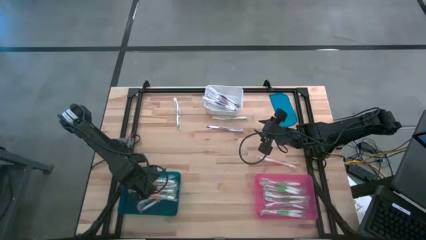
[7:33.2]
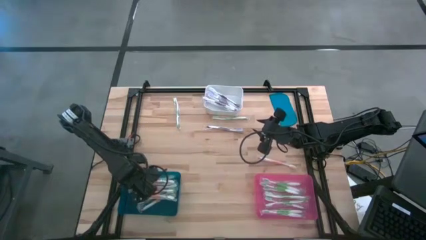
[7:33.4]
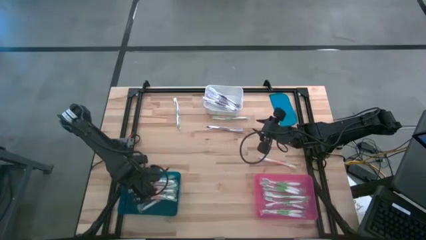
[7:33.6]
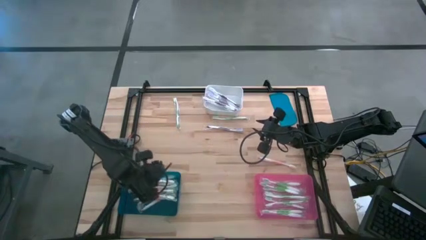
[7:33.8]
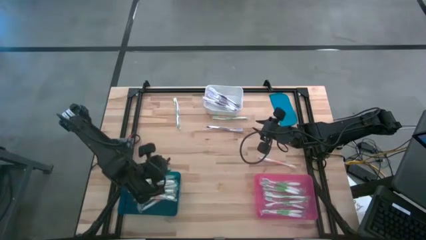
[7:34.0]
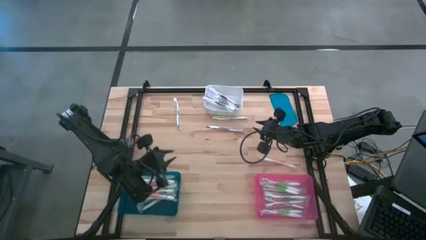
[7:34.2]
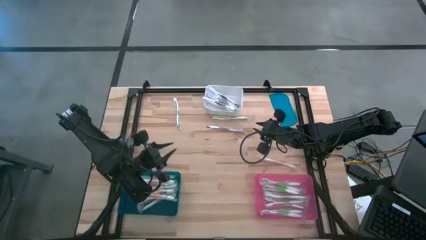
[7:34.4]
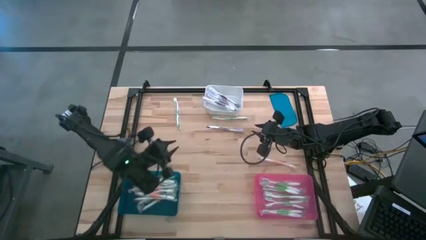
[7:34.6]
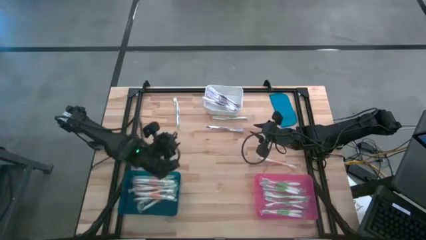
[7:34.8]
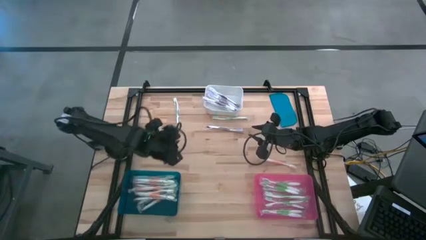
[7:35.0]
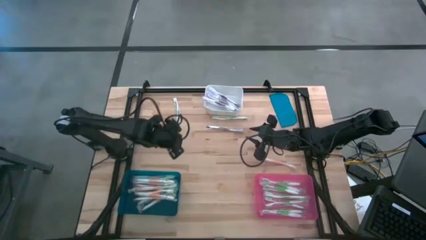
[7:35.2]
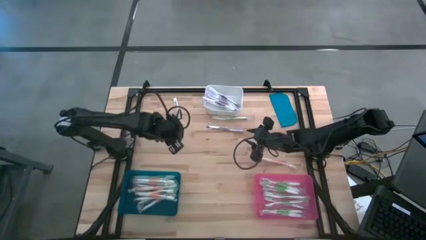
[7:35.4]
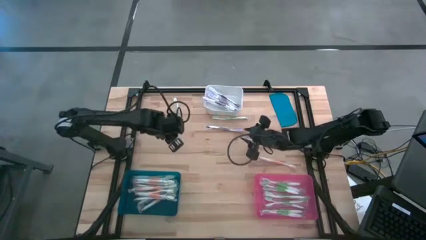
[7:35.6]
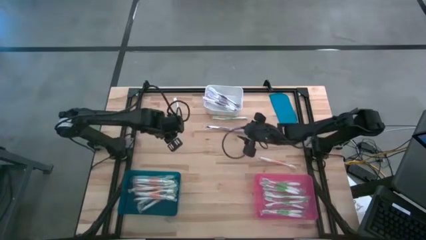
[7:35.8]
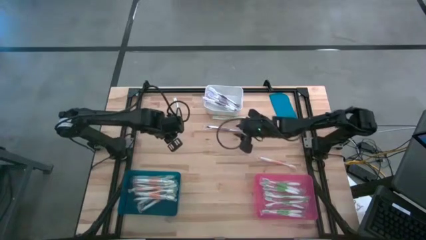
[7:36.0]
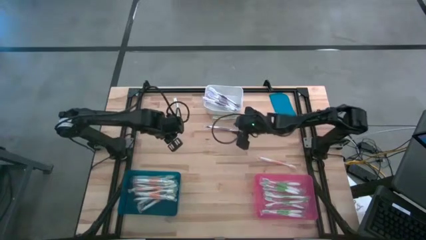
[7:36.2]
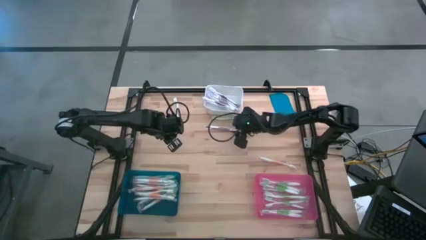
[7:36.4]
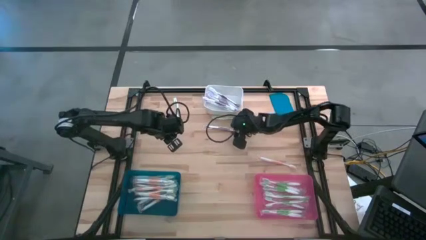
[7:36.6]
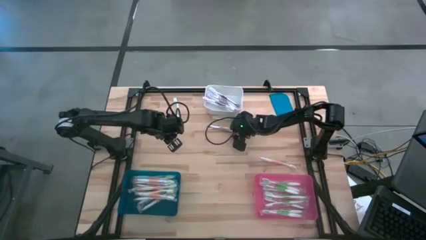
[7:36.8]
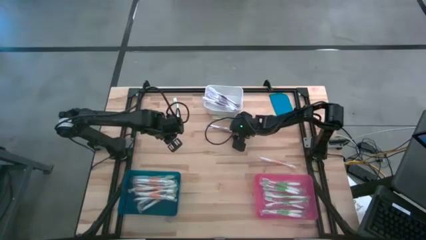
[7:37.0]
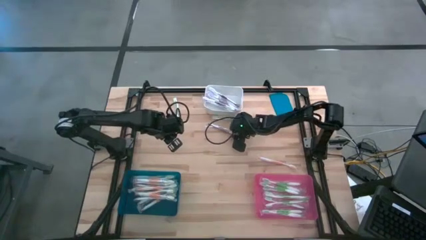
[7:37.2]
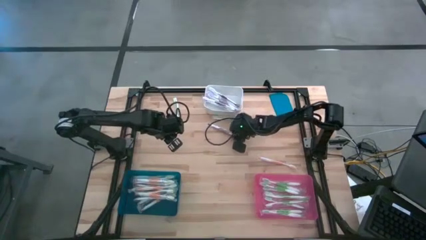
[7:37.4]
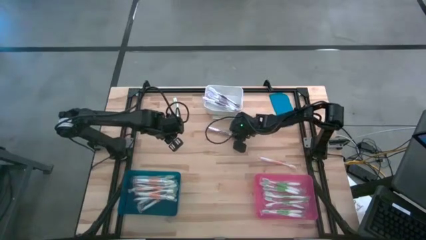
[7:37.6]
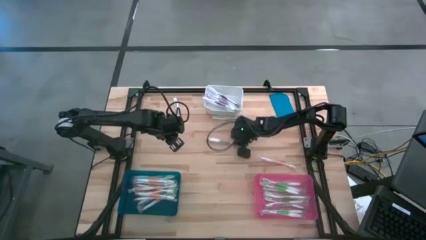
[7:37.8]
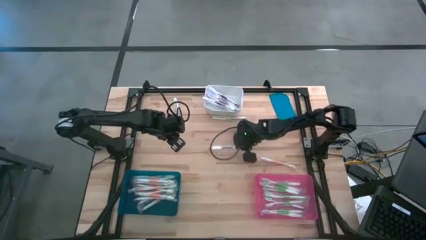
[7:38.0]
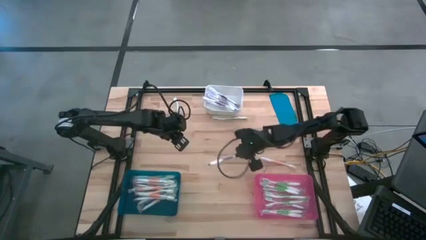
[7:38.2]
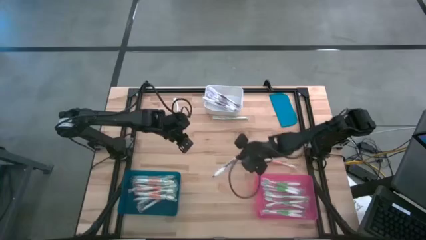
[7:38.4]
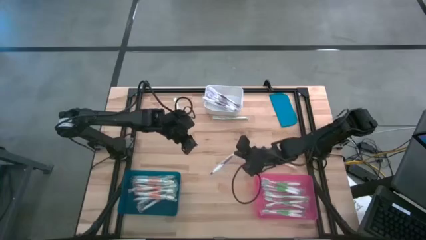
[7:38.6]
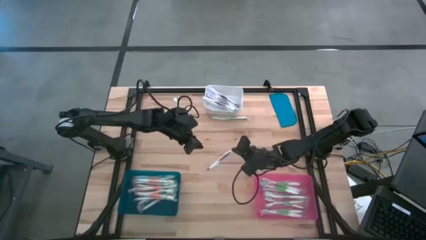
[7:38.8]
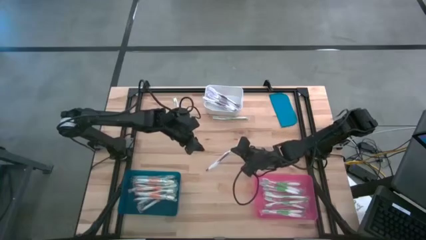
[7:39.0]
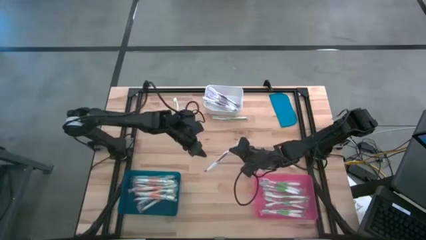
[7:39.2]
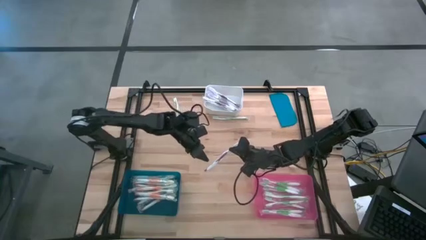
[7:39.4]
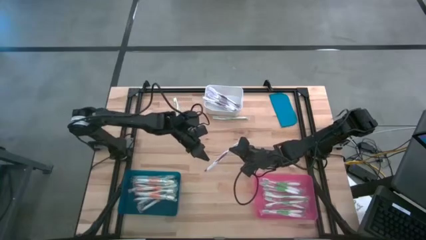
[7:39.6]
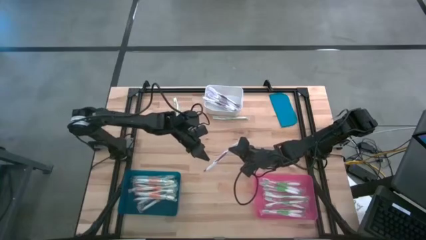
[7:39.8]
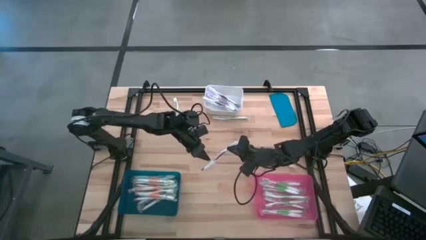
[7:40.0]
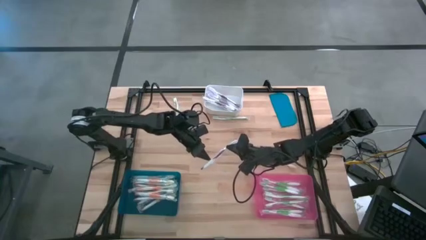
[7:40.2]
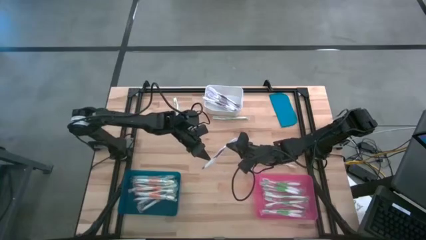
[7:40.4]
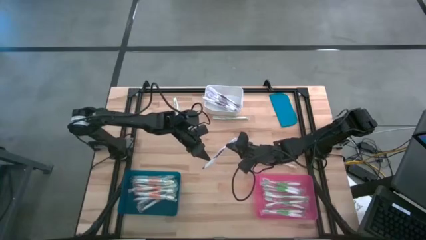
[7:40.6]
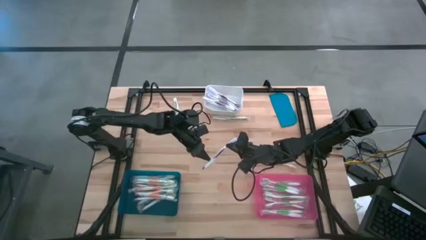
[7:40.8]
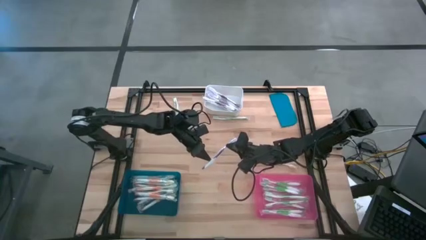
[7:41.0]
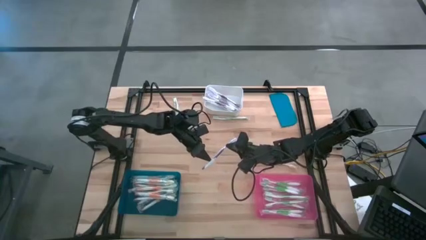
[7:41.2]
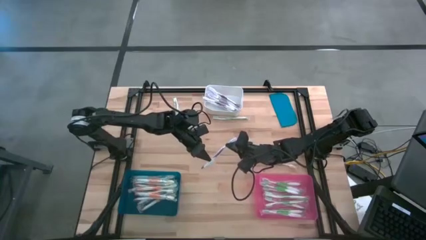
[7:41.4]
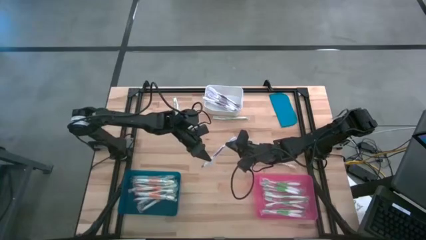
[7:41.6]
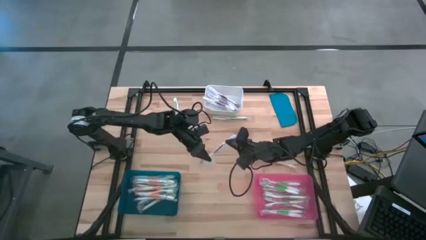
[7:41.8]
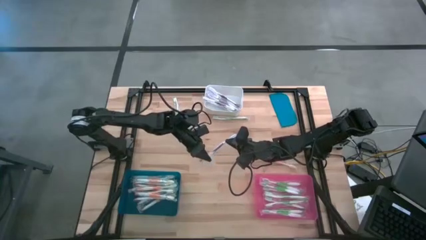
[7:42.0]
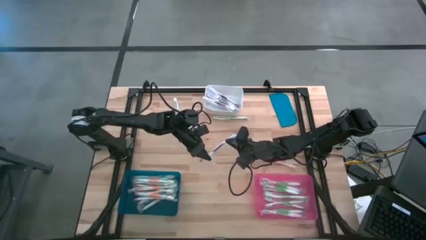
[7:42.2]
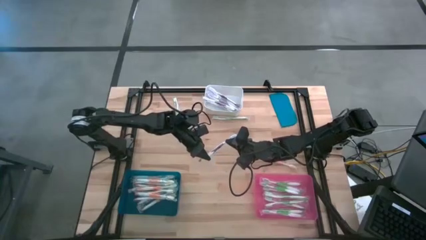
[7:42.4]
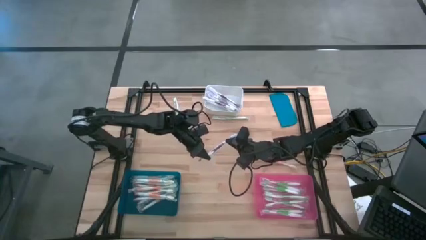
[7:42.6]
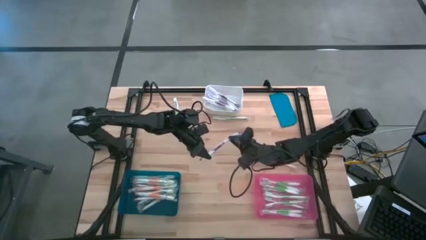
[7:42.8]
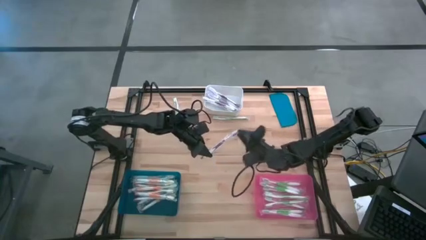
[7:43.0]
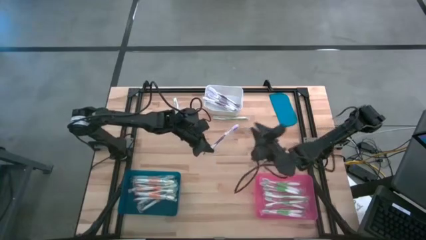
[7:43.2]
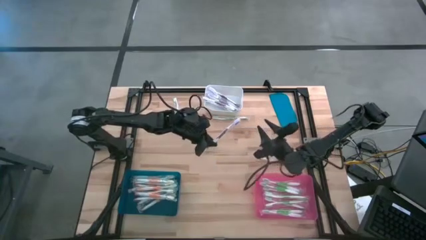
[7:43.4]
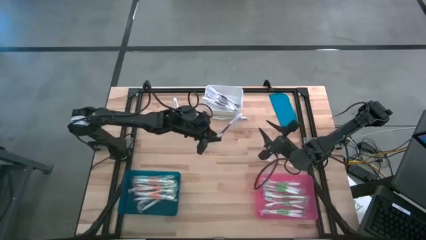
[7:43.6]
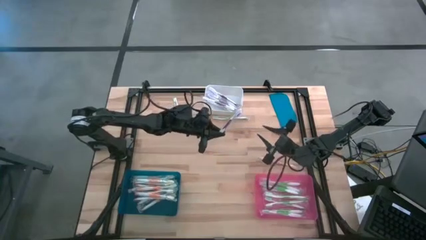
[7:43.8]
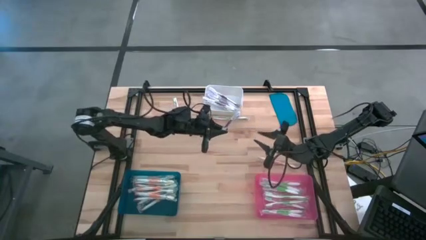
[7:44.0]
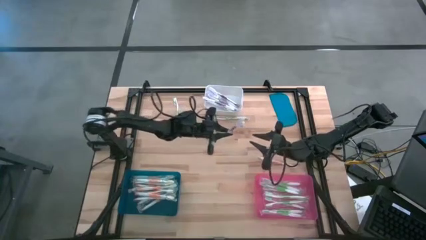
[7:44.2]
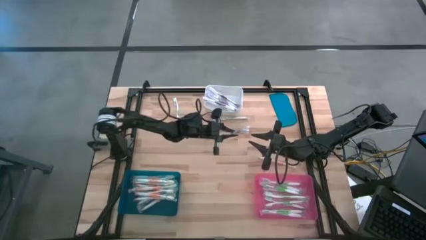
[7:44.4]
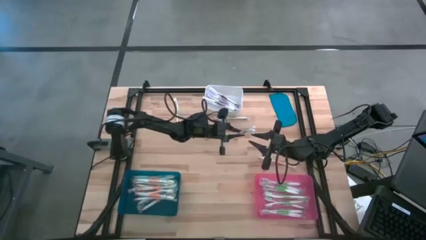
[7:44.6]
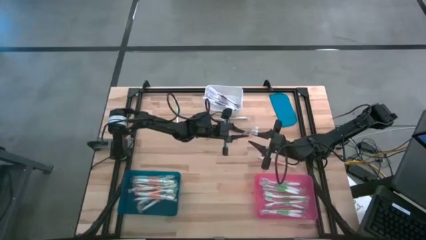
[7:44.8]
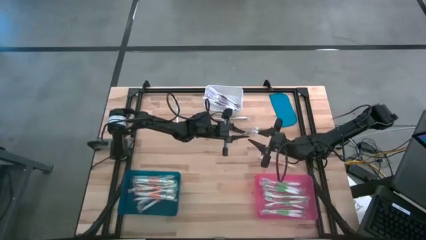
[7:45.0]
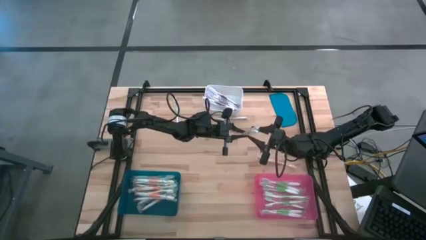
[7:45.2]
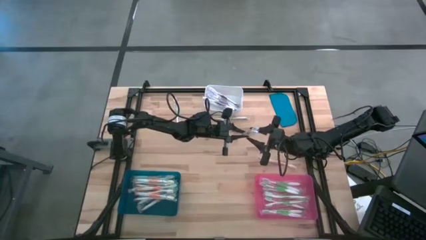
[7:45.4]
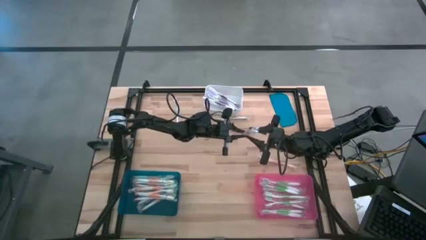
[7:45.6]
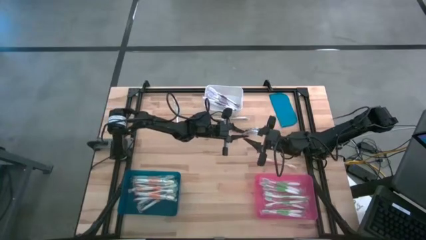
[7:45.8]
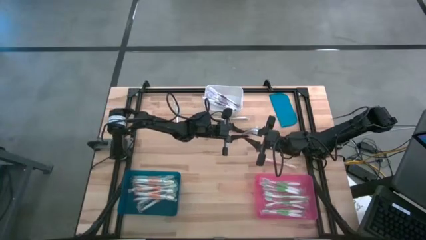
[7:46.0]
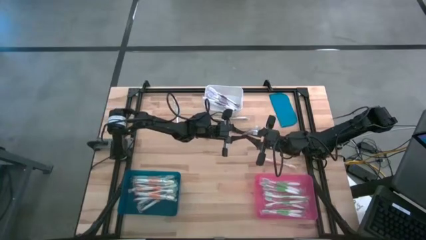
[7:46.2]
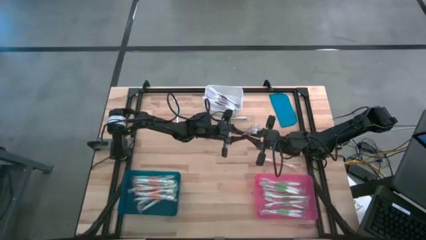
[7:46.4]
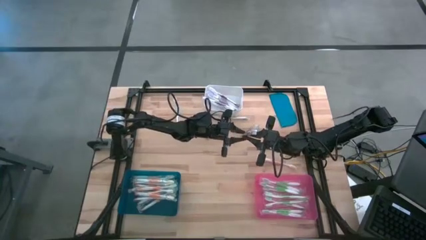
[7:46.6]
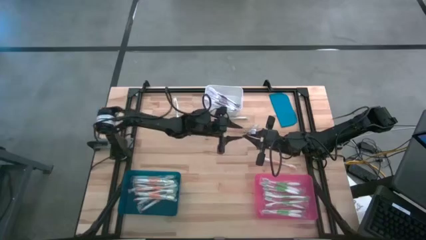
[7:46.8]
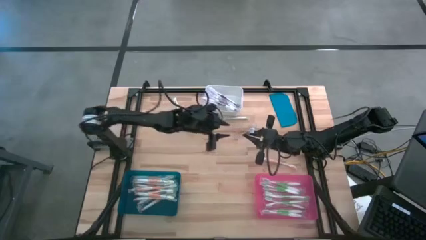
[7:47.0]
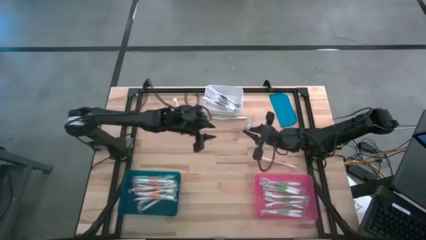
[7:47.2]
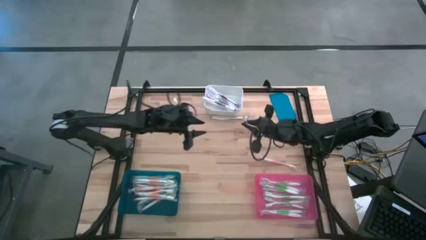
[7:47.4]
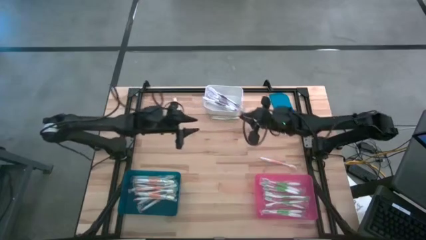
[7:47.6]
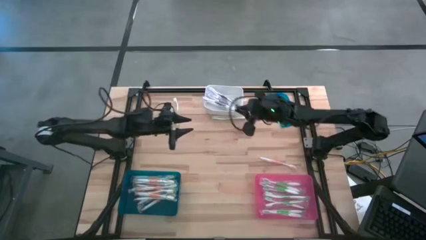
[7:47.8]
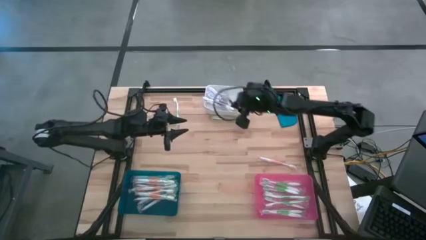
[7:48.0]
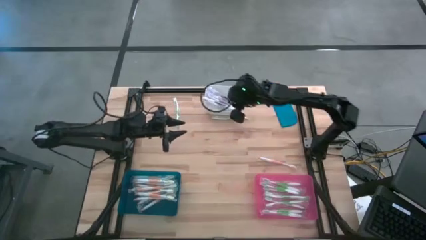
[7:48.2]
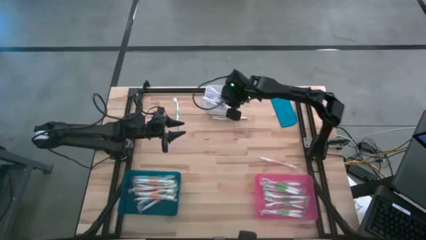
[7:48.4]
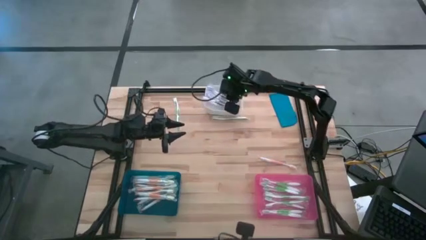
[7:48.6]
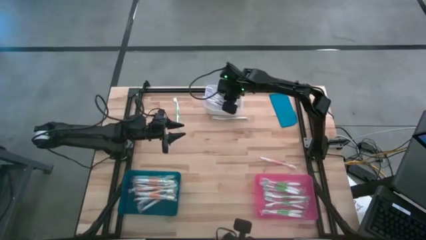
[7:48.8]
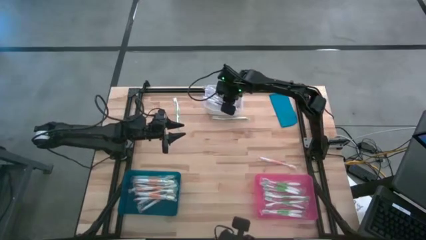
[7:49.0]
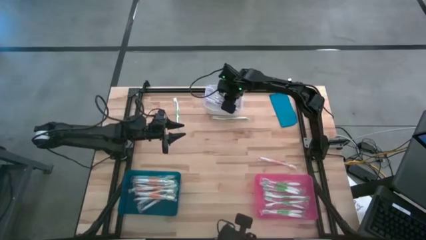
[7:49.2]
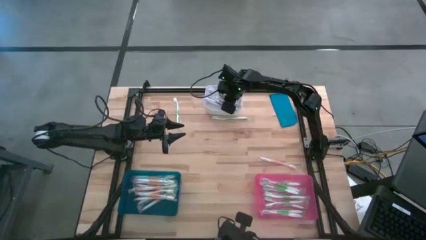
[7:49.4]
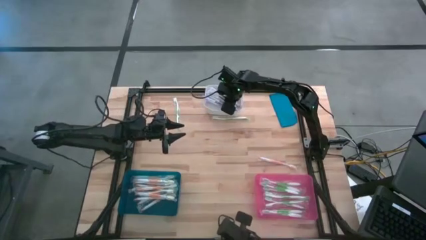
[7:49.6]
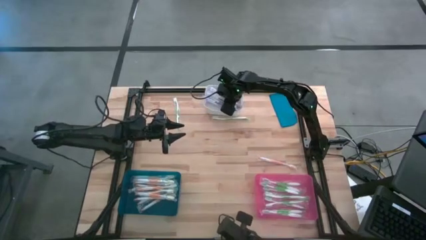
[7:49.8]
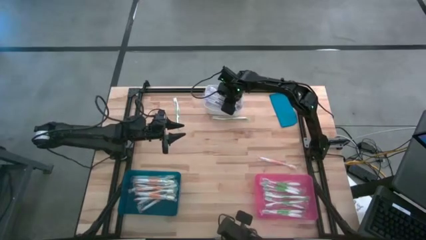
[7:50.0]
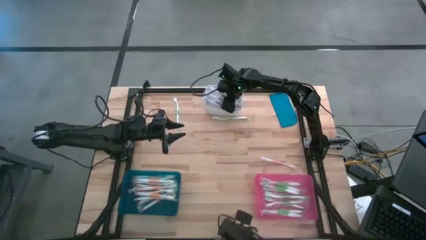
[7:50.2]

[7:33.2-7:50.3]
Task: Pick & Place Toothbrushes
Put the violet toothbrush into the white bin
